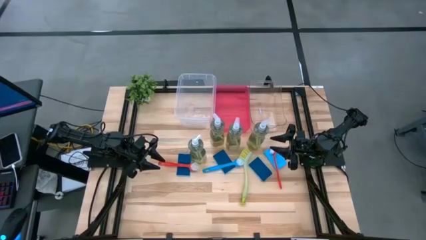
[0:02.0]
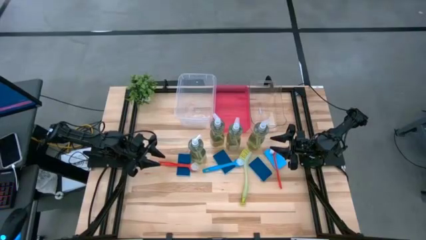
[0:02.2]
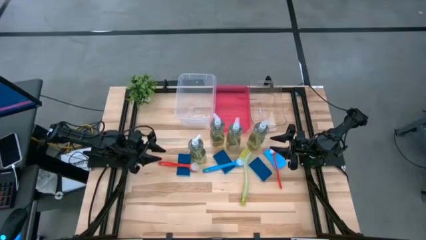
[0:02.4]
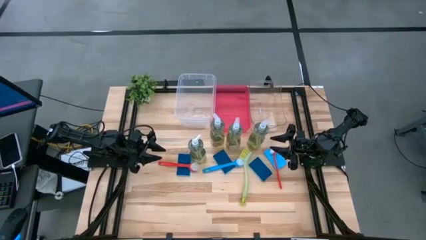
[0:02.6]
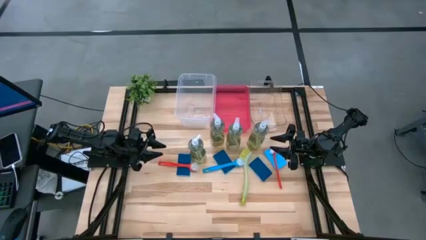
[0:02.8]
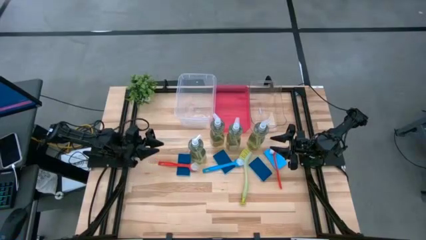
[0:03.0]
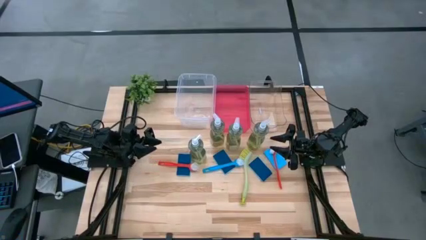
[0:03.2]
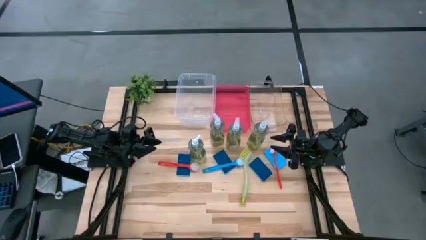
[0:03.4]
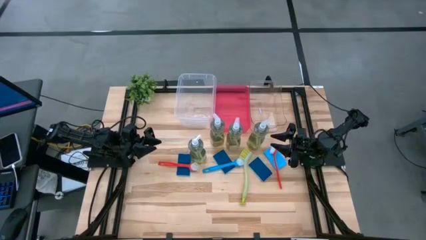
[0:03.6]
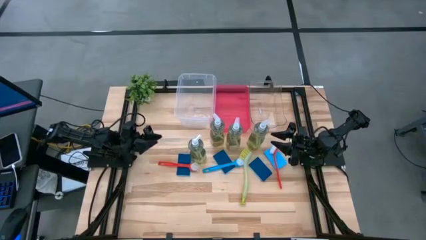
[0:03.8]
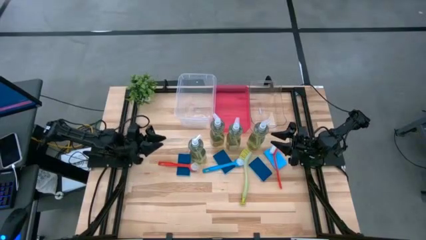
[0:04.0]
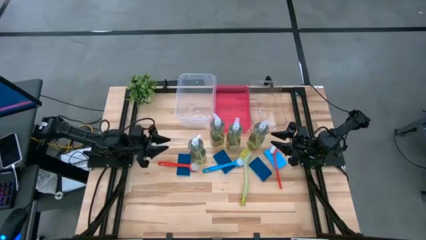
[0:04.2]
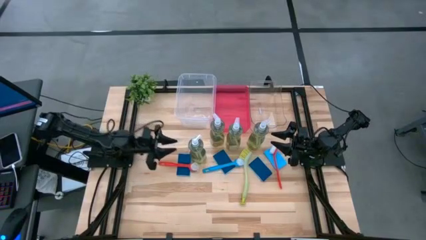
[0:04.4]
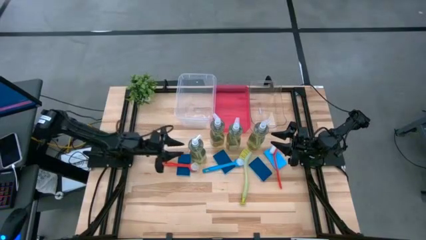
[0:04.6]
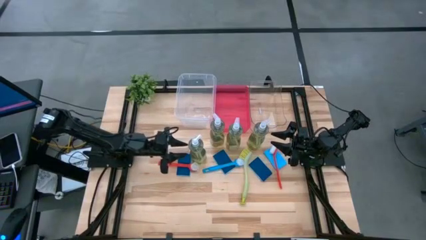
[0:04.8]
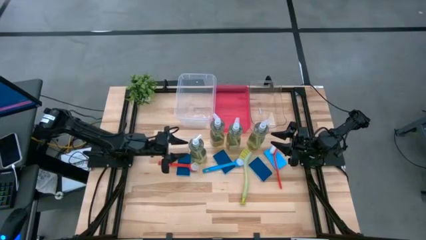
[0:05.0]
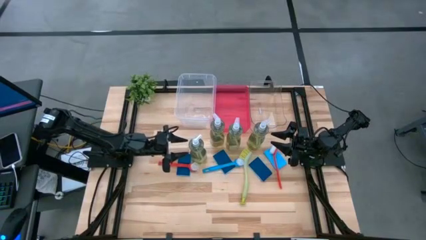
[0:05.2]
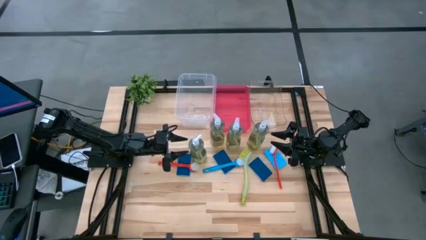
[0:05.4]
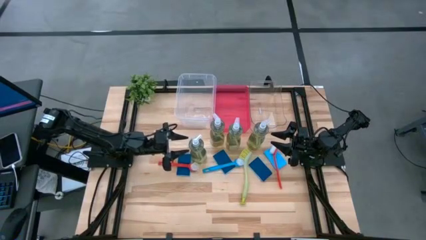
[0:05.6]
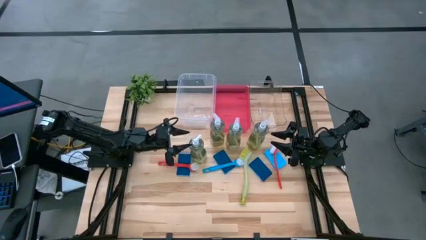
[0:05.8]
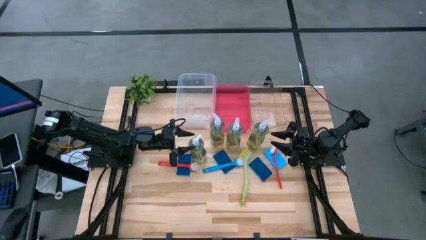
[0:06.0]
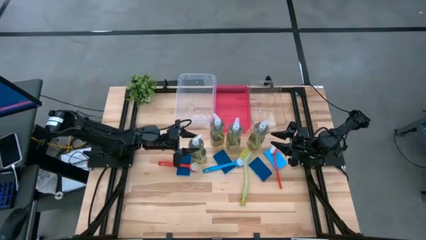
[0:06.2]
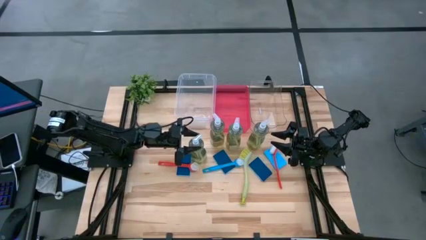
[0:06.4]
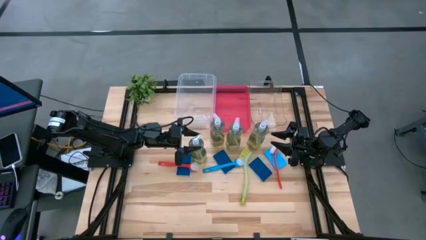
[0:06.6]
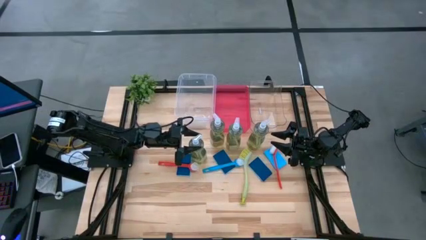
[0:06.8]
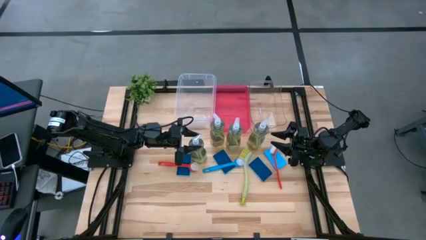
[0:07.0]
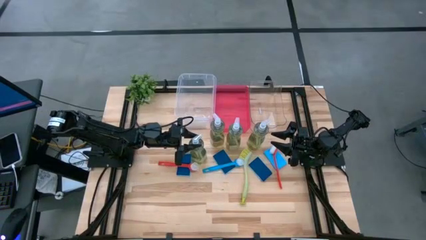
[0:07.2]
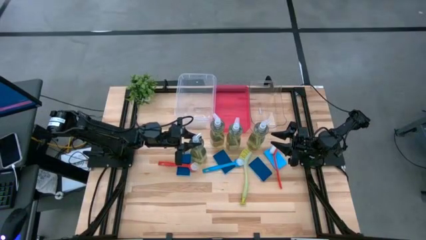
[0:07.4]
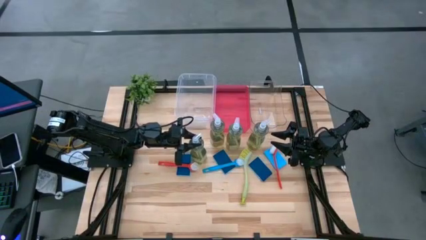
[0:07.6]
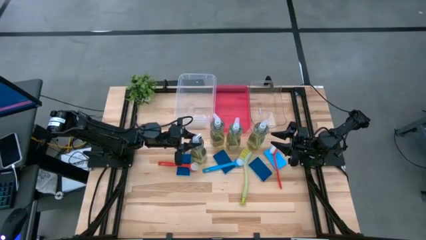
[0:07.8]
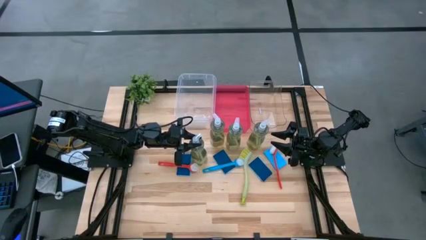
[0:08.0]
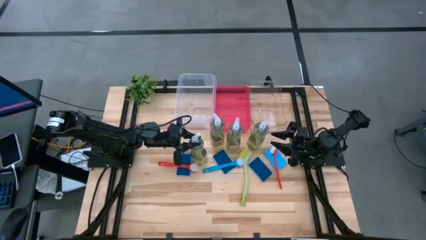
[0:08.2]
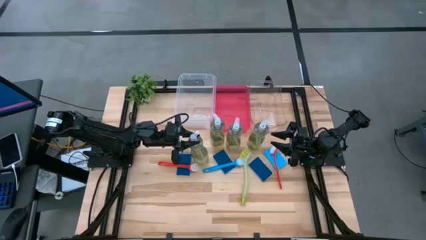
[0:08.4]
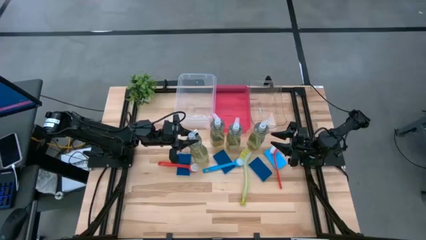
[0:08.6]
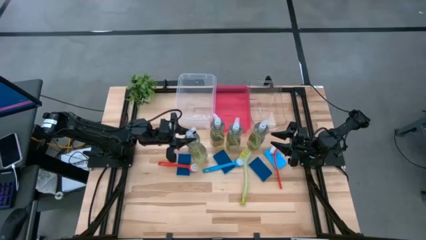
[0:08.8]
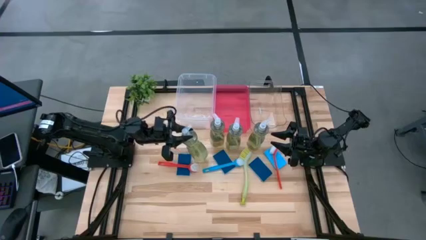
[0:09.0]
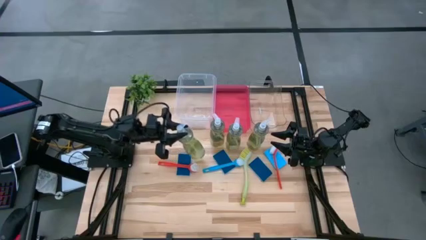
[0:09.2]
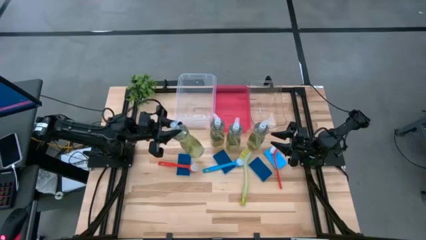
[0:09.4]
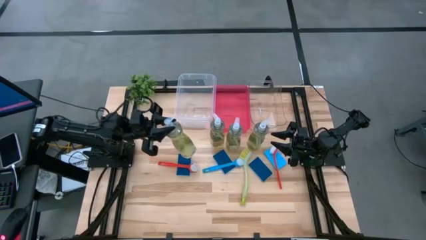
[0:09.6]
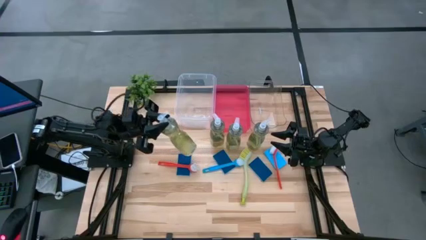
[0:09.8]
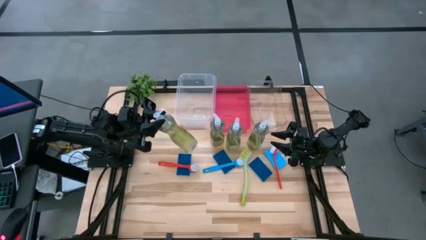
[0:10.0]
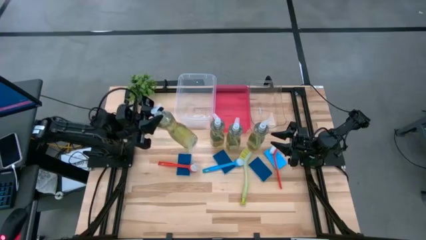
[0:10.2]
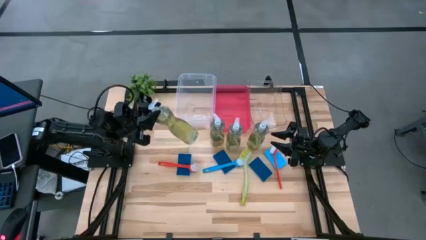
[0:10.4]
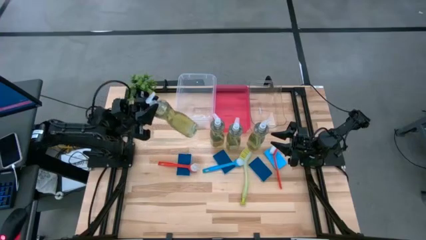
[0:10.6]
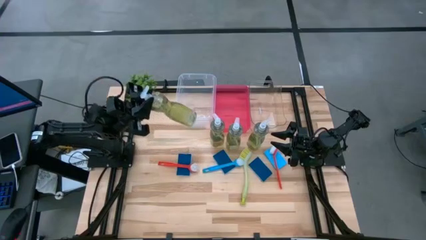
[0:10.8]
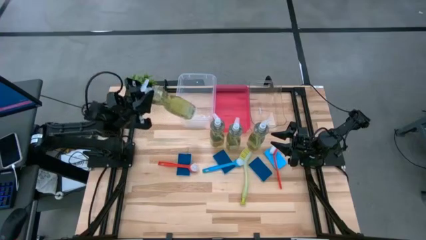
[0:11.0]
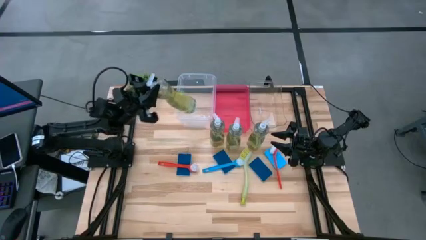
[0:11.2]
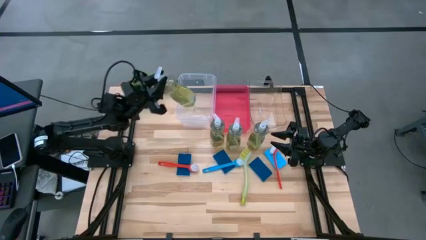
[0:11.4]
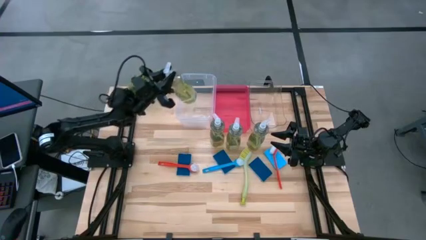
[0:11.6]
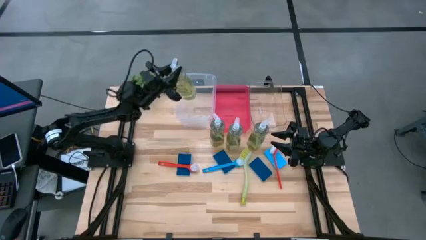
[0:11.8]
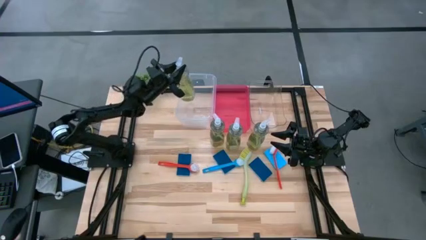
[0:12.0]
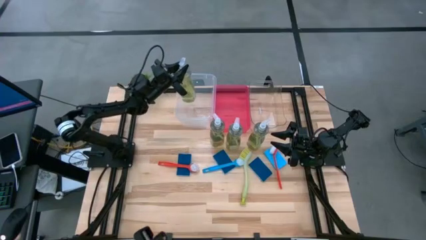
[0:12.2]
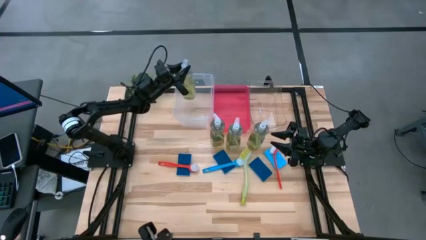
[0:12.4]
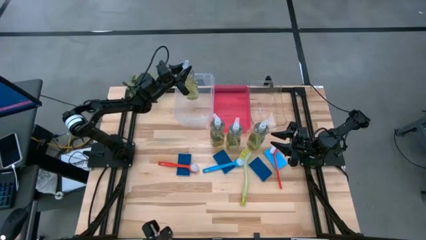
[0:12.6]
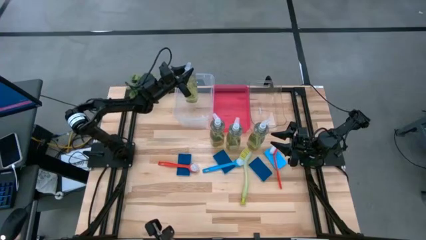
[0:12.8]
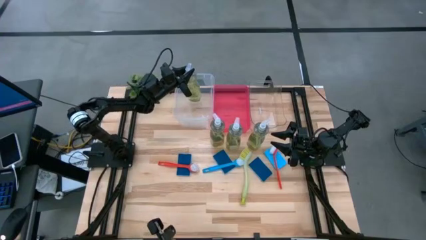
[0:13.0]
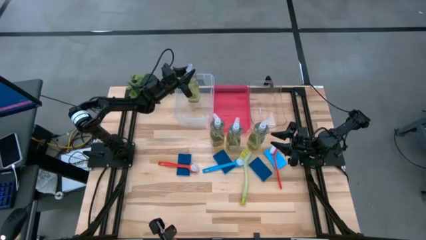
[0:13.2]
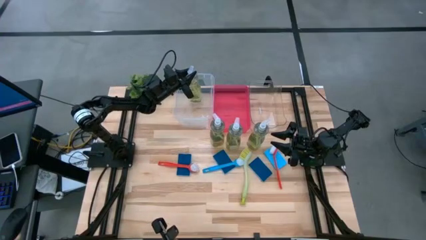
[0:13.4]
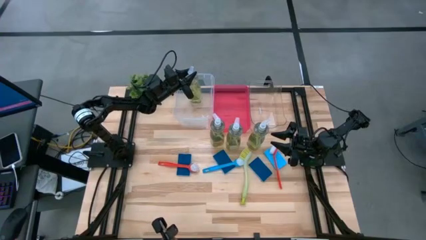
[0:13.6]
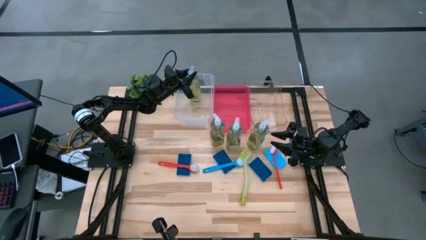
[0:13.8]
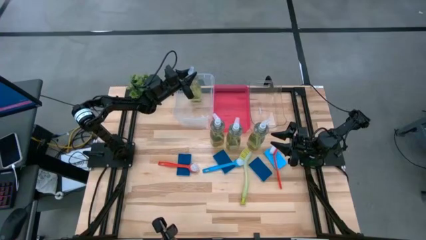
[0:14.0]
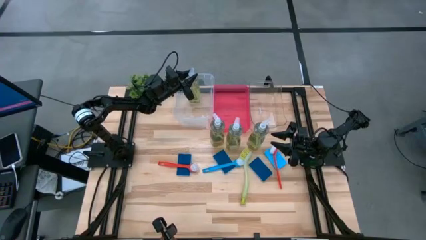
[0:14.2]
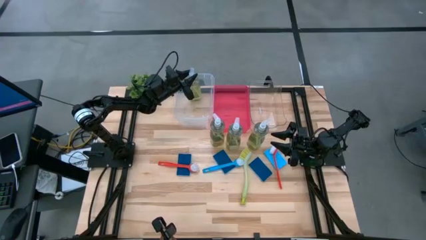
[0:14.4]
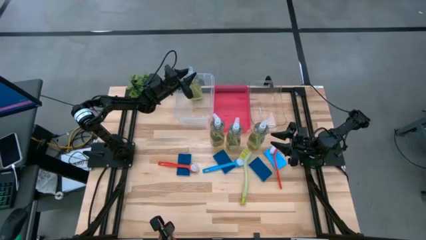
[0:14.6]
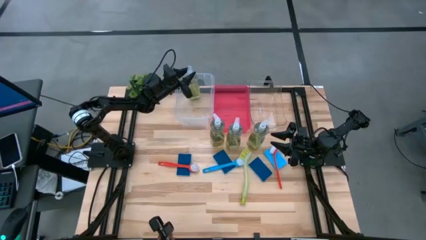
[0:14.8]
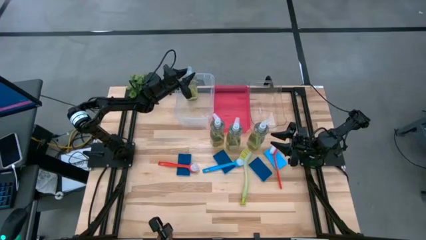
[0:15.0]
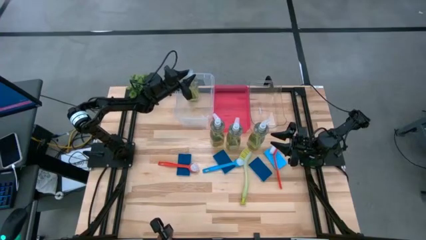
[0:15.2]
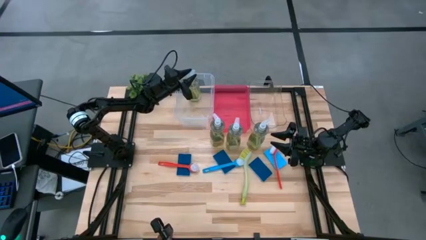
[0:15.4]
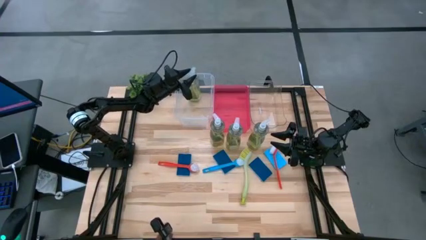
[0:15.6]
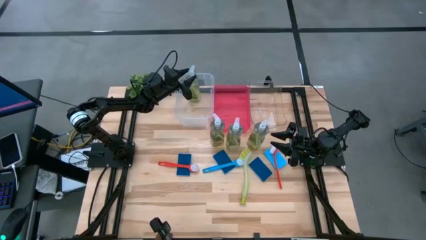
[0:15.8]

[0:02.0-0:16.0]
Task: Pick & Place Kitchen Sink Supplies
Put the yellow dish soap into the transparent container

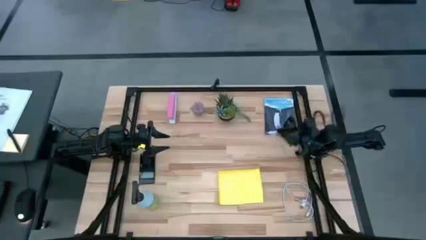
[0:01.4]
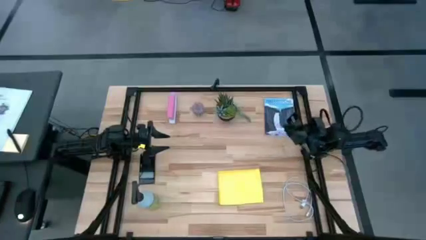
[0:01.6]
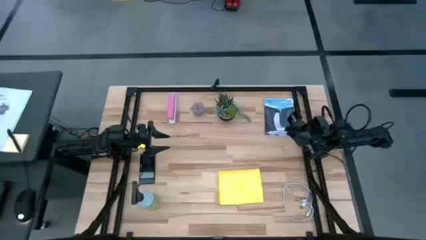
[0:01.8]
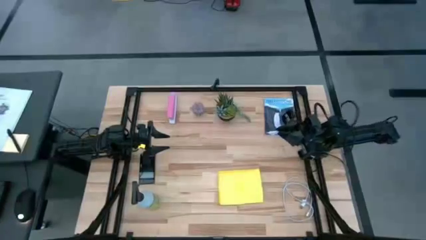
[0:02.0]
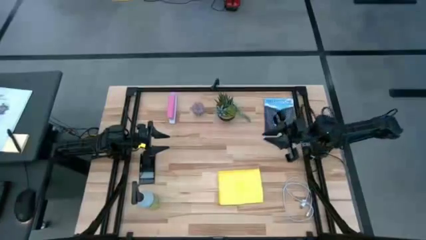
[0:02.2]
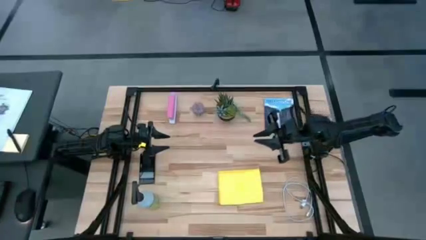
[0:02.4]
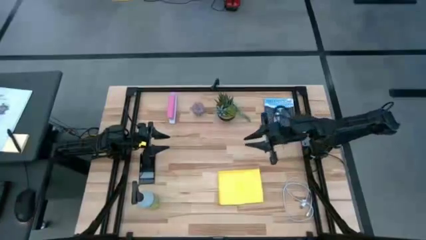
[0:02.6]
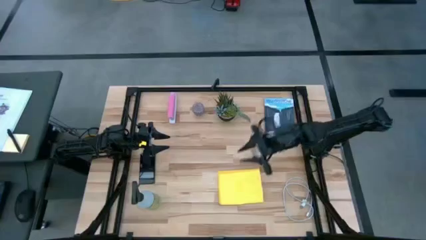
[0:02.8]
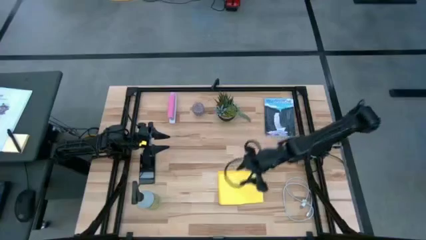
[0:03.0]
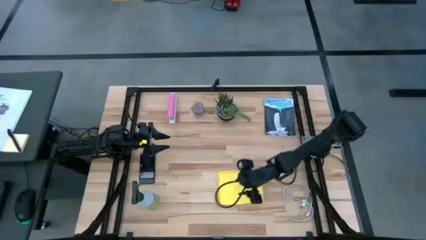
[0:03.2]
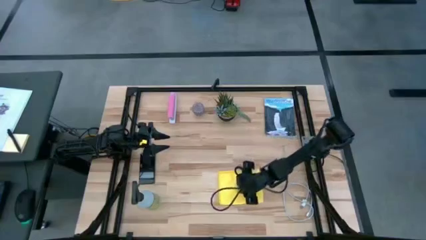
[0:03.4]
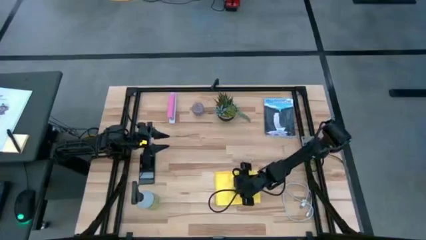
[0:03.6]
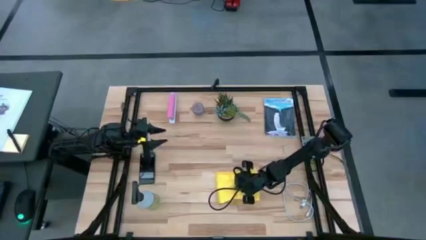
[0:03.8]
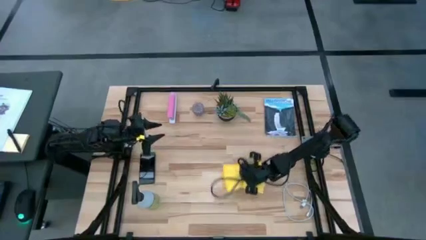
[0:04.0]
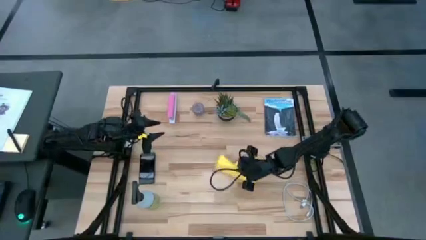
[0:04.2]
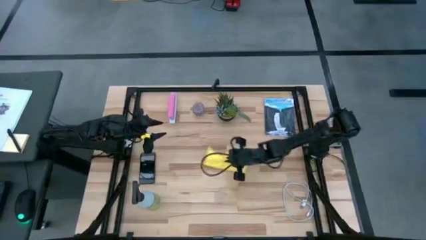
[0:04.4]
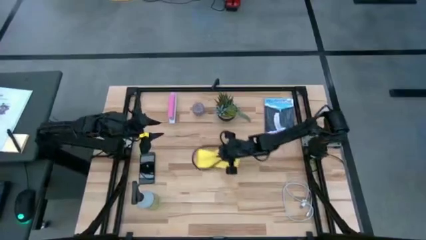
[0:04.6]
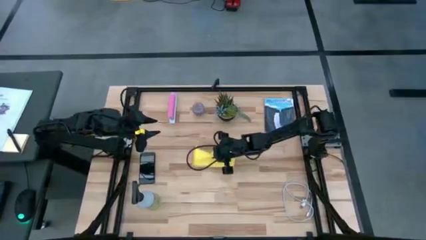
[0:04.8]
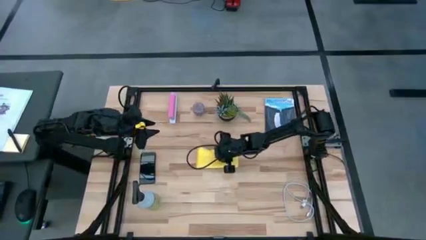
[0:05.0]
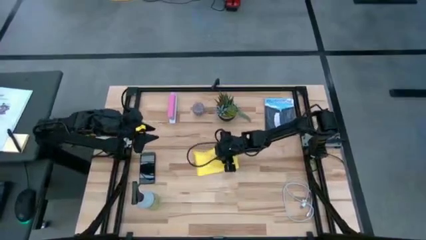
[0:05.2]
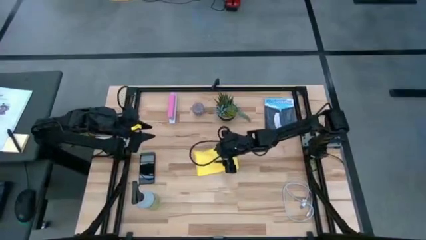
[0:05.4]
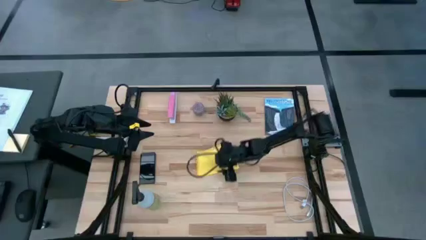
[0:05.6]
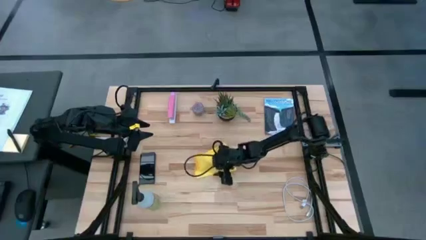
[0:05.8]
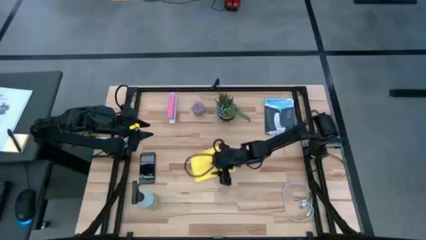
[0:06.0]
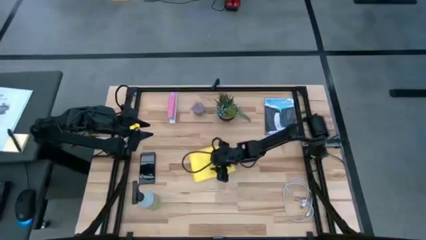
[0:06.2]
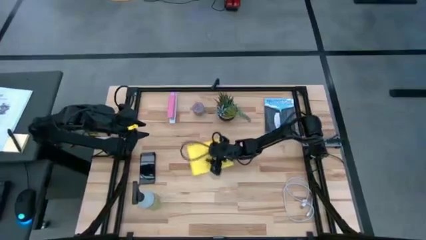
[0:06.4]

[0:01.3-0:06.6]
Task: Apply microfiber cloth
Move the yellow microfiber cloth to the center
